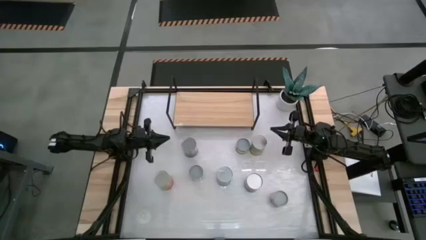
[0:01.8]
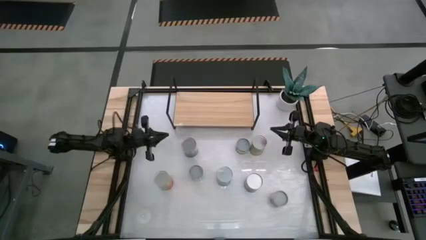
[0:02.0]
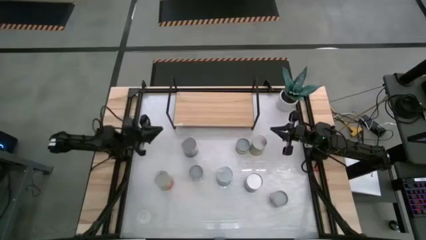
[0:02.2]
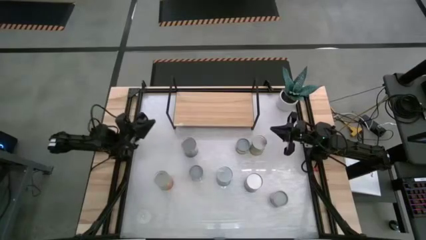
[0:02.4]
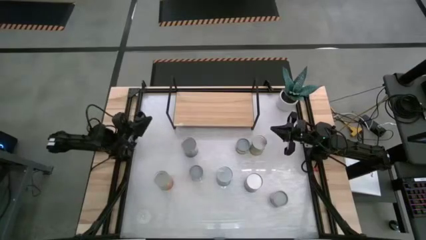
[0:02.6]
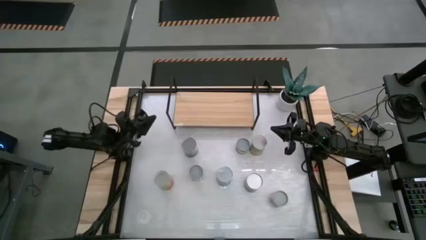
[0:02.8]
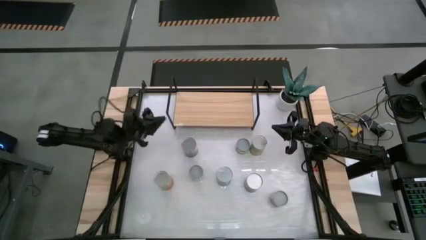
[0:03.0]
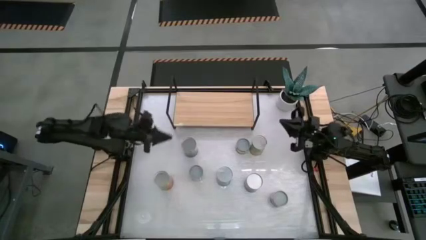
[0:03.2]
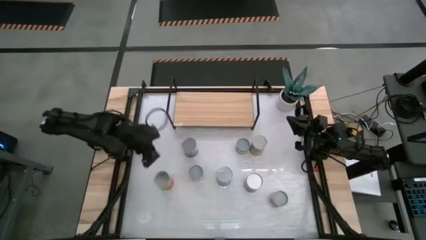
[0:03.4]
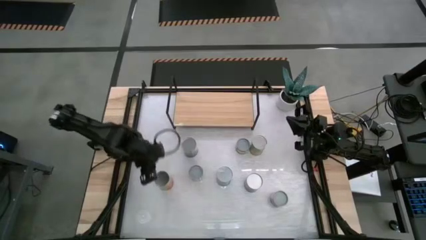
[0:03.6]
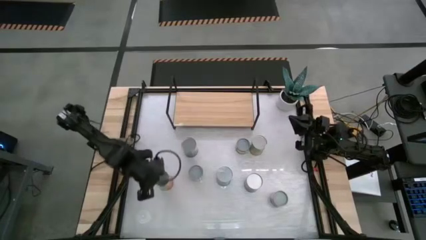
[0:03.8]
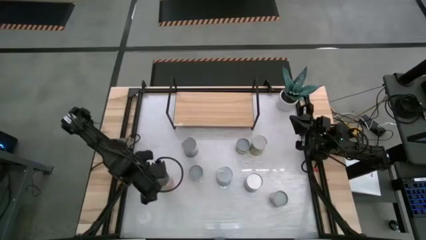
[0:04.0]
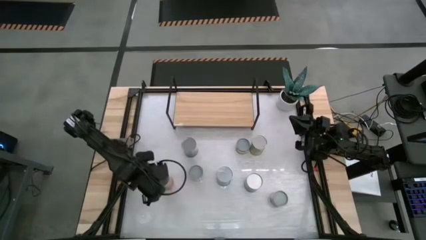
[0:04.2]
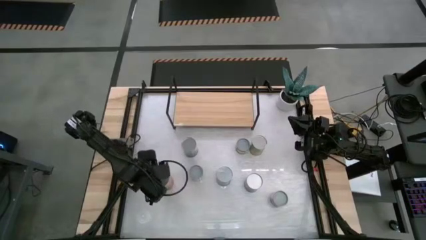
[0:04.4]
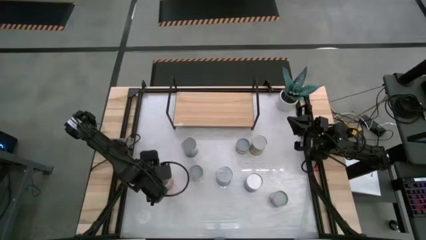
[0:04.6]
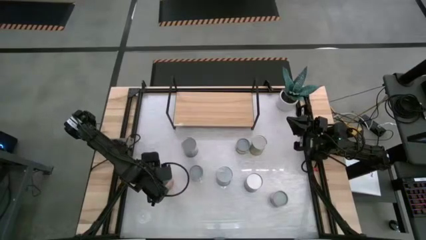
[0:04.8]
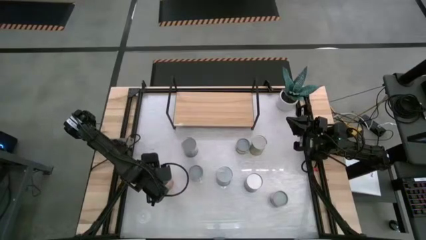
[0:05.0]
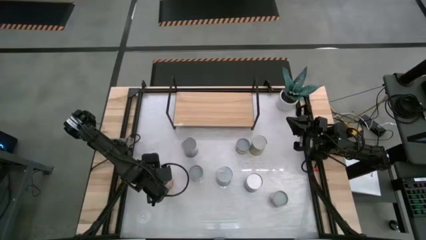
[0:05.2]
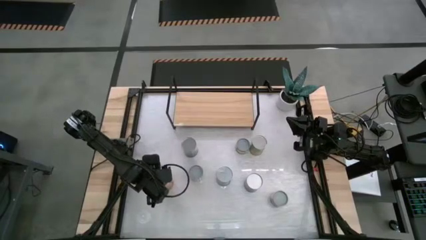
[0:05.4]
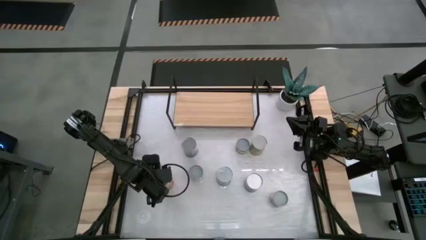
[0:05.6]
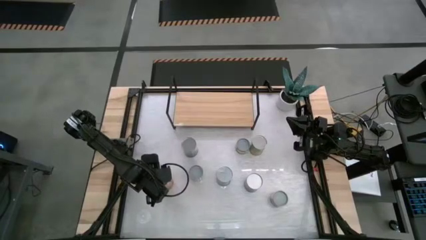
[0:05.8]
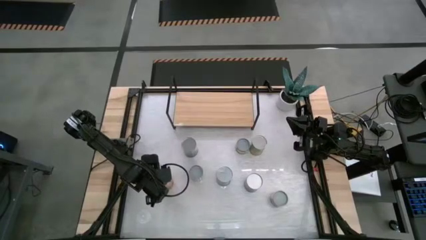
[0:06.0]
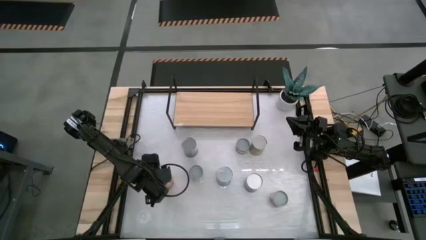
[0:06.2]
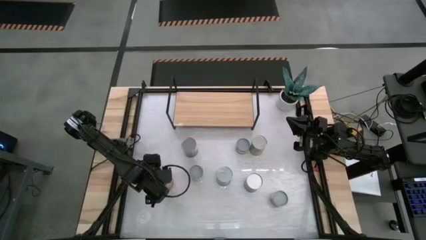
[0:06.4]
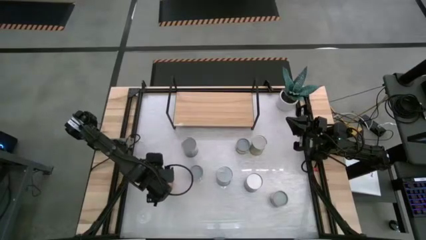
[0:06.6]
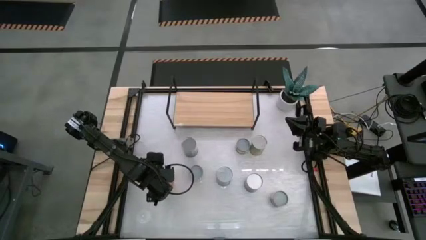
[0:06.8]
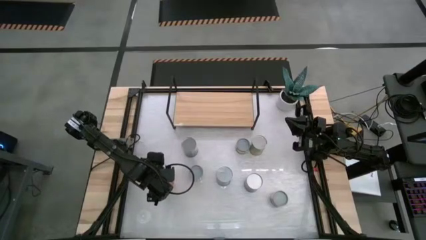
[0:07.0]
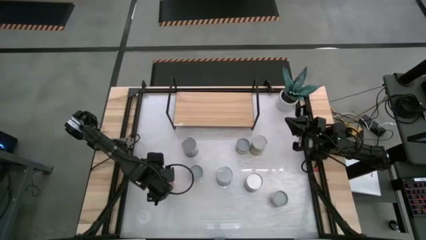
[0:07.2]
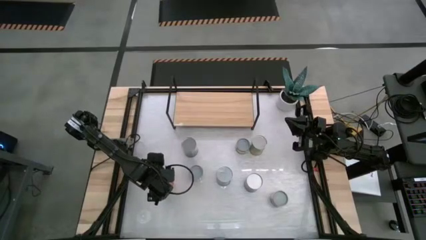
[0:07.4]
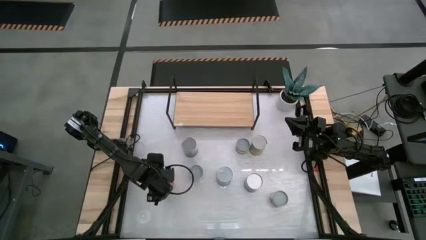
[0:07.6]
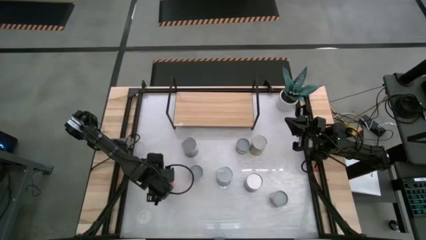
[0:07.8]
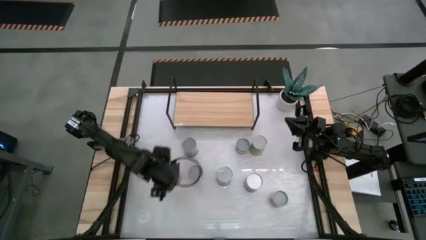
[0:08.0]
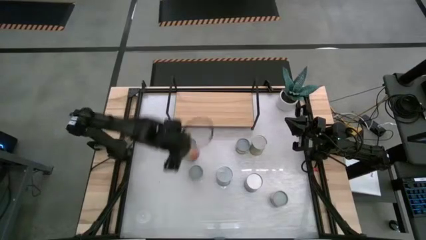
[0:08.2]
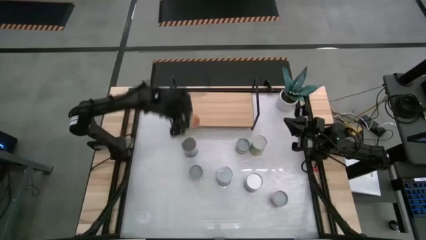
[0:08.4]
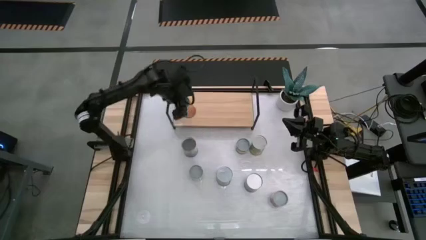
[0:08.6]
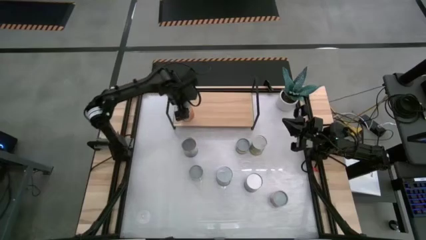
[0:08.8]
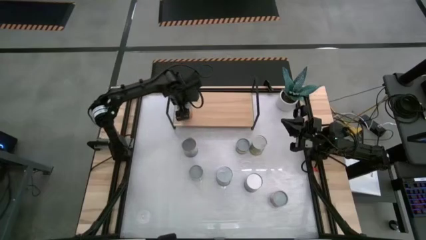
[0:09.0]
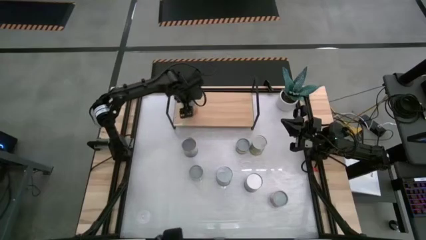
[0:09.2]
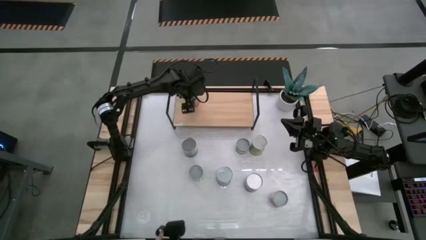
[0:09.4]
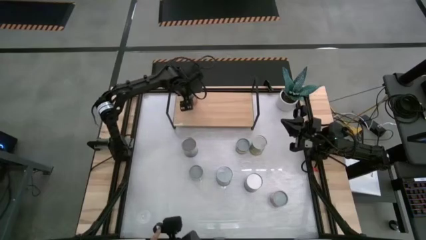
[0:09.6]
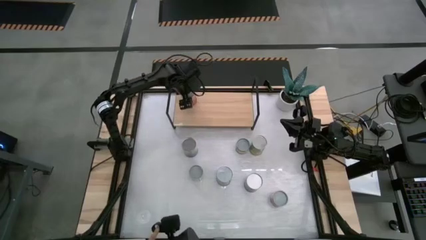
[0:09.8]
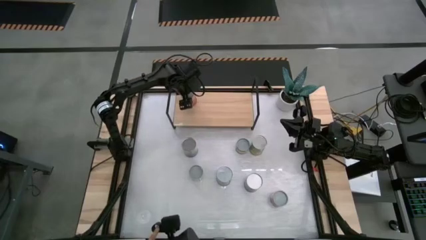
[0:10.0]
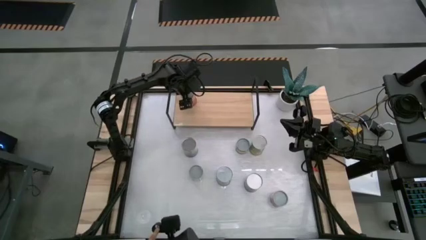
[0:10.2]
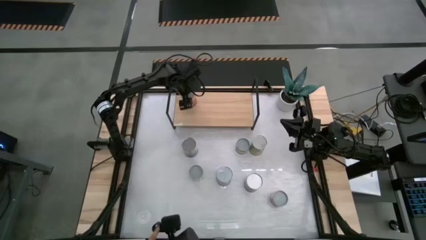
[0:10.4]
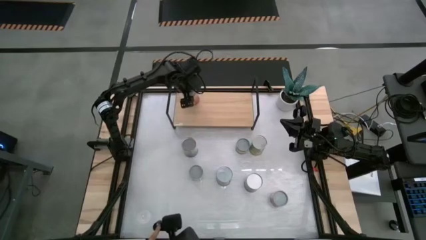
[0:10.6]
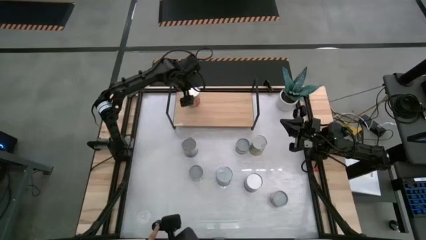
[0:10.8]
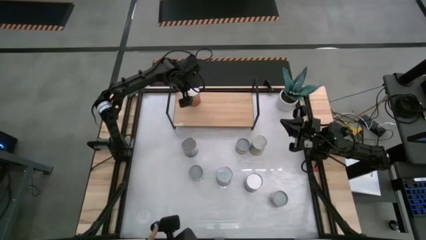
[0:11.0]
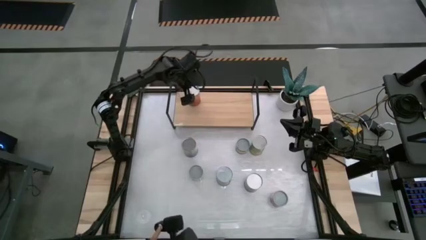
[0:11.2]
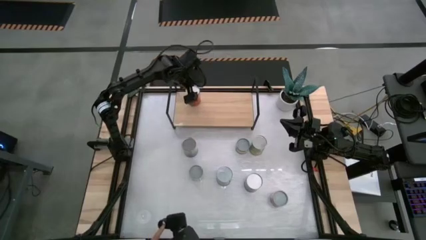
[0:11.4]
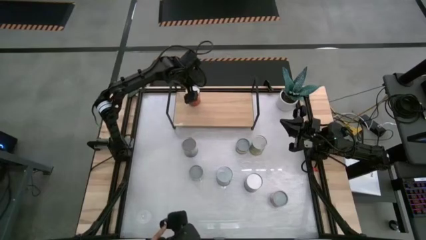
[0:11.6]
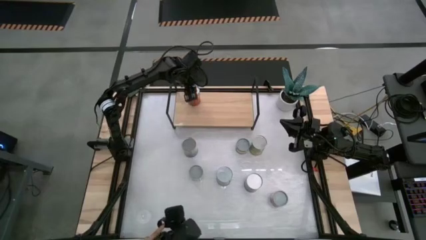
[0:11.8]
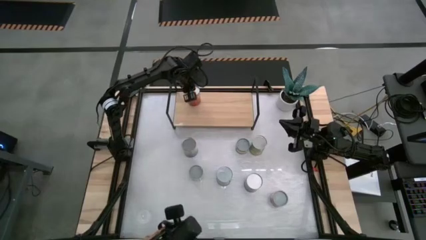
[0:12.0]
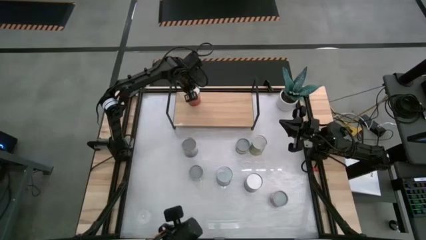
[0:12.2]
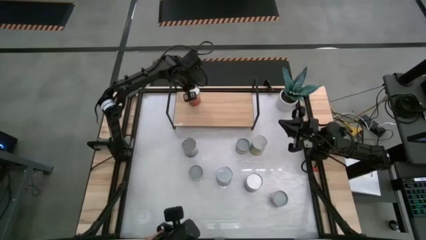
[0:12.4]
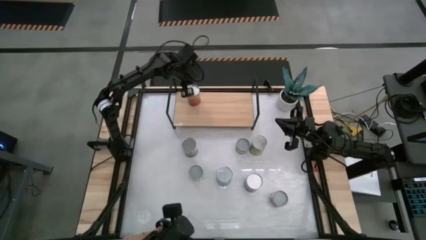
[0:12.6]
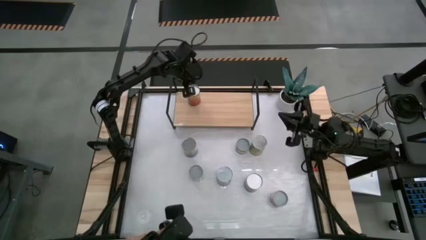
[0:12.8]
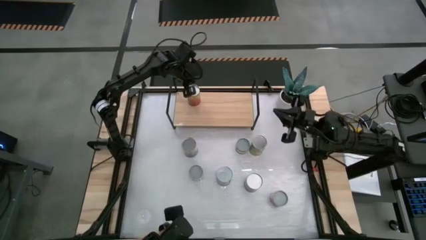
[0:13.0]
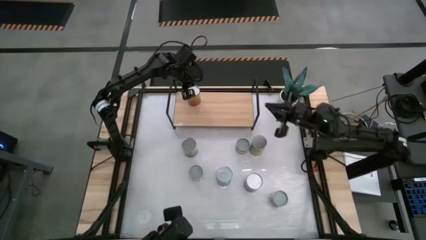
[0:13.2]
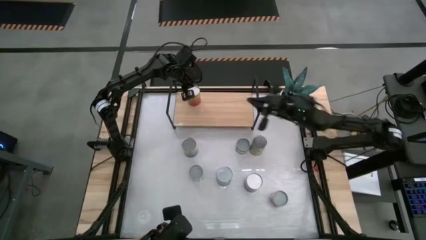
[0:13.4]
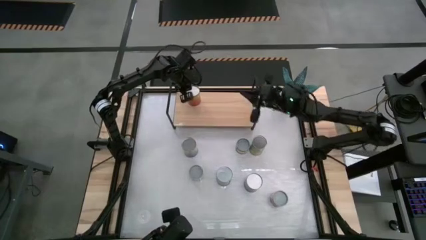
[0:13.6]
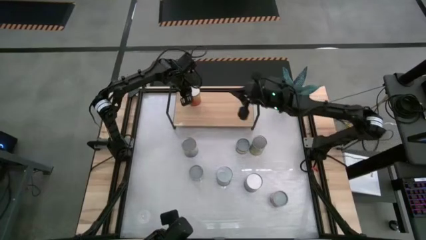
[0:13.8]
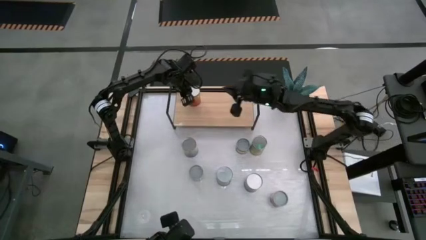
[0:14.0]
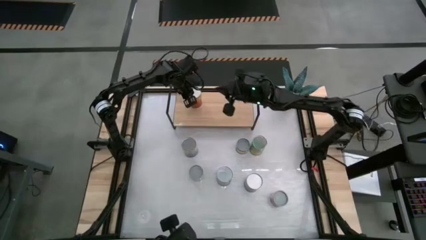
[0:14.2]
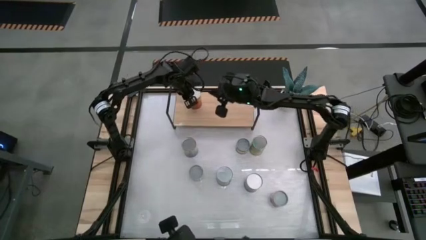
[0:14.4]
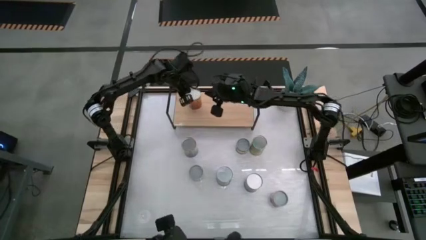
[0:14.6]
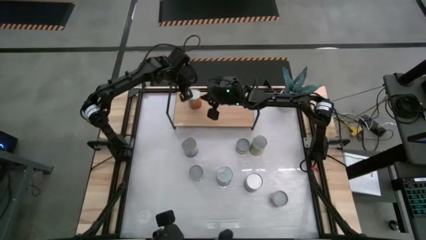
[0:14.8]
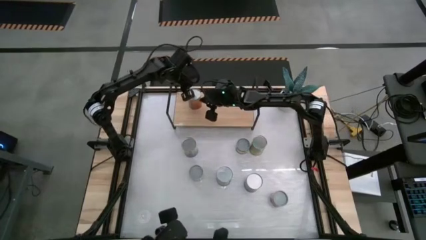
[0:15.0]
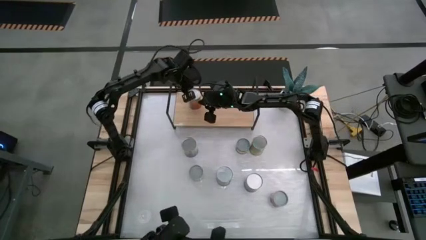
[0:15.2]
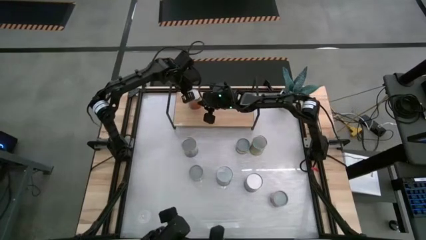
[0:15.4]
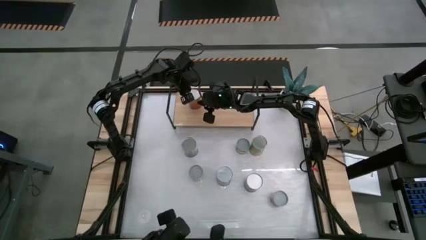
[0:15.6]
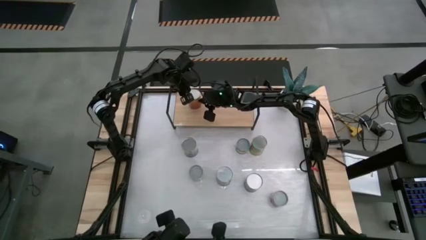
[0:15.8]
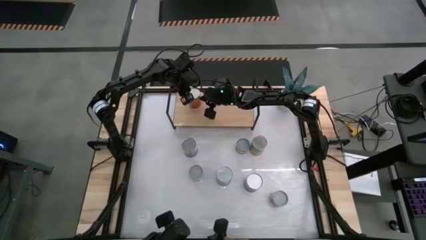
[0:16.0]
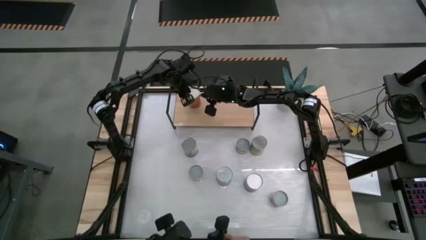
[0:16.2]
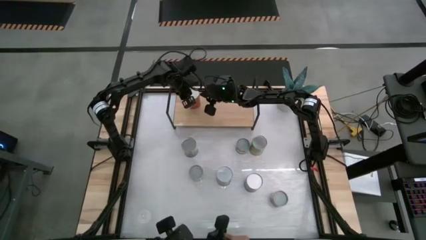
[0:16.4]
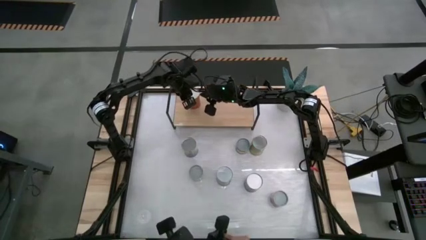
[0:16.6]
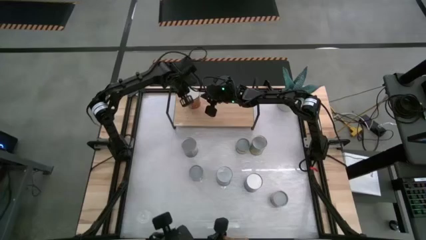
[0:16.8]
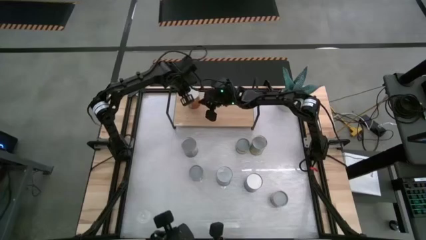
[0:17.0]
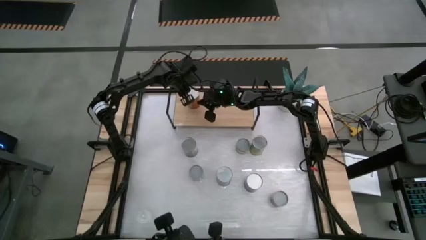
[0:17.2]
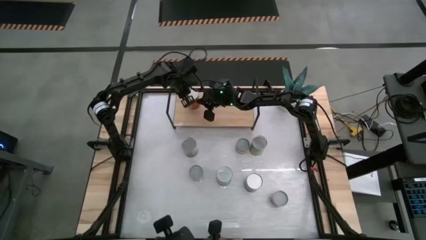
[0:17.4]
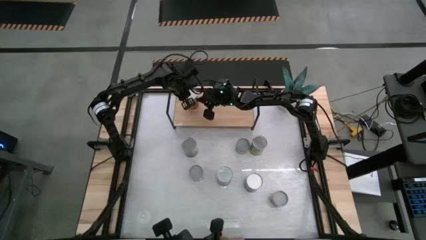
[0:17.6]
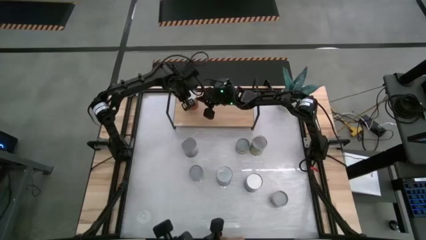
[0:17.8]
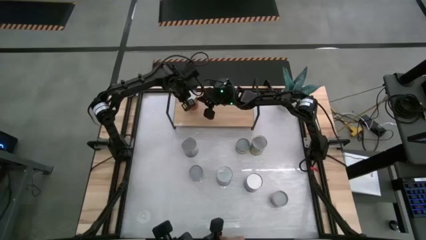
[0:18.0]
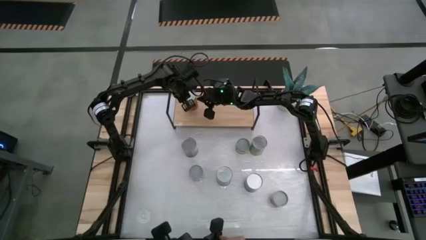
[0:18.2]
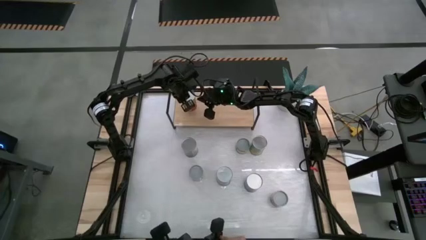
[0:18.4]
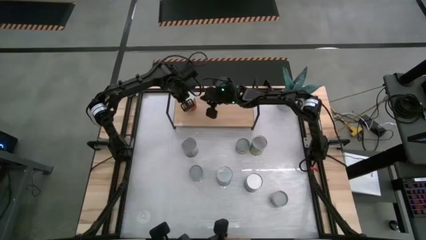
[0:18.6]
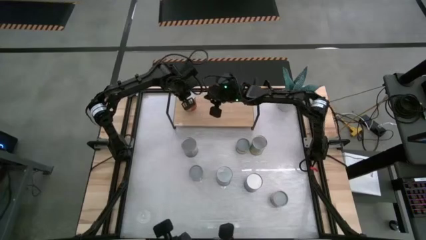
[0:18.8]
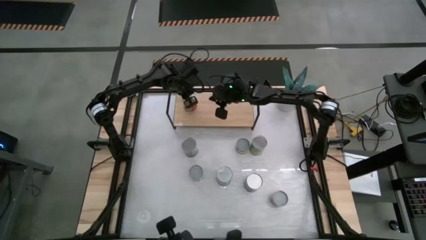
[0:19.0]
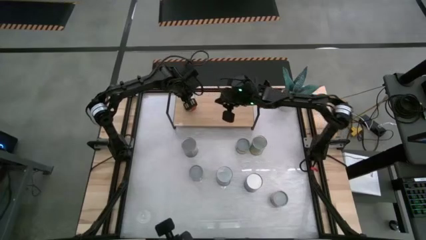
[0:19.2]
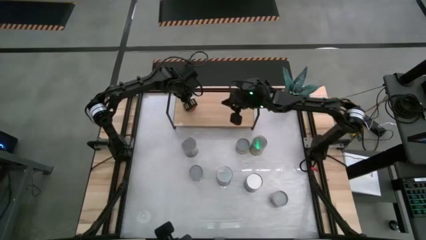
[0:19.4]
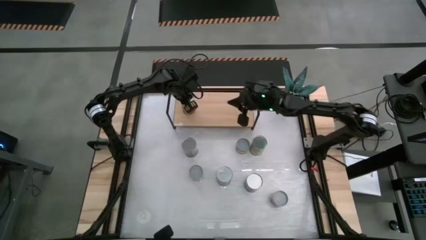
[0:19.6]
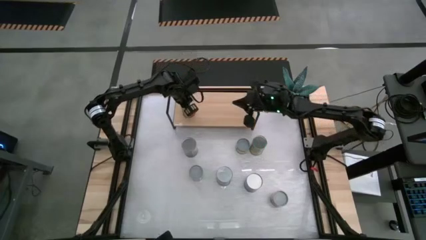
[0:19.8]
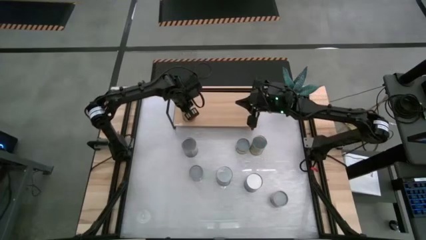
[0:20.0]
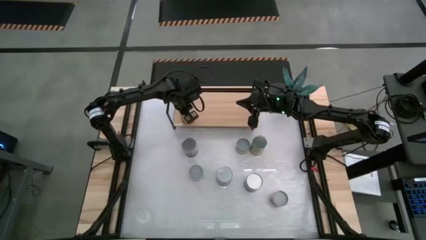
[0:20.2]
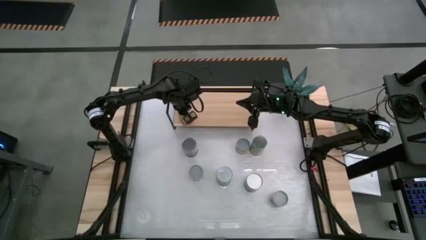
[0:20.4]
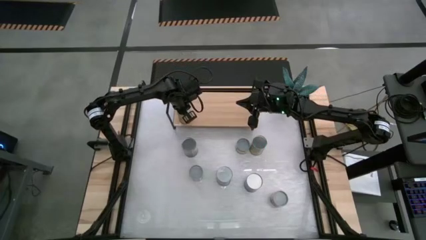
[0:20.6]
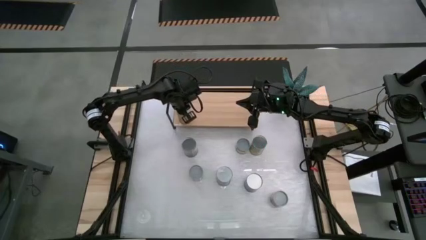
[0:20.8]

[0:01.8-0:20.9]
Task: Pick and place cans onto a shelf
Put the canned pineapple on the shelf
